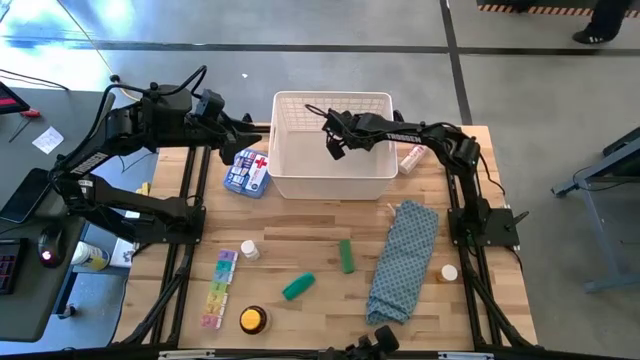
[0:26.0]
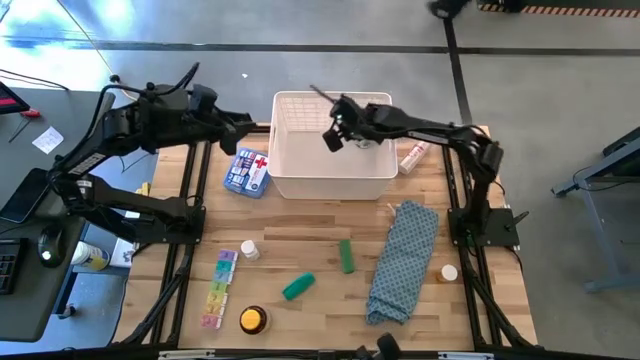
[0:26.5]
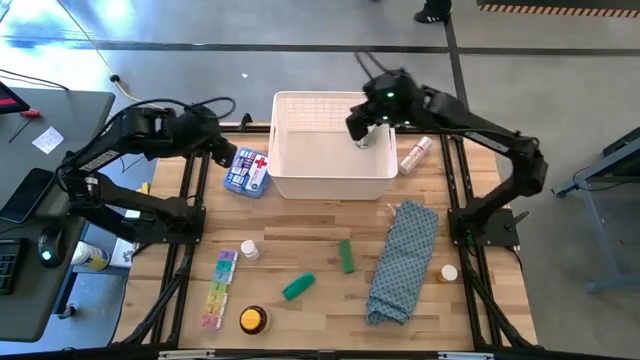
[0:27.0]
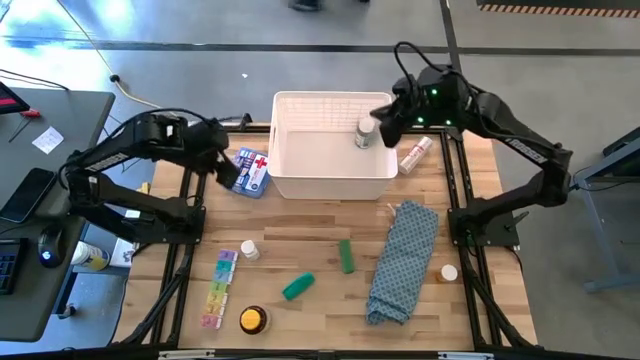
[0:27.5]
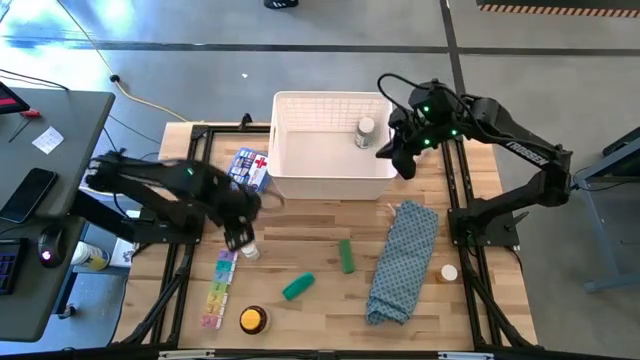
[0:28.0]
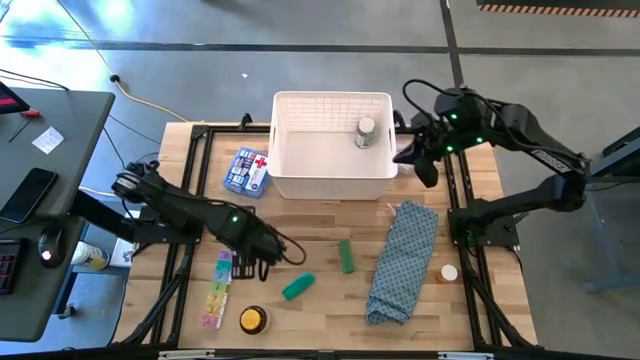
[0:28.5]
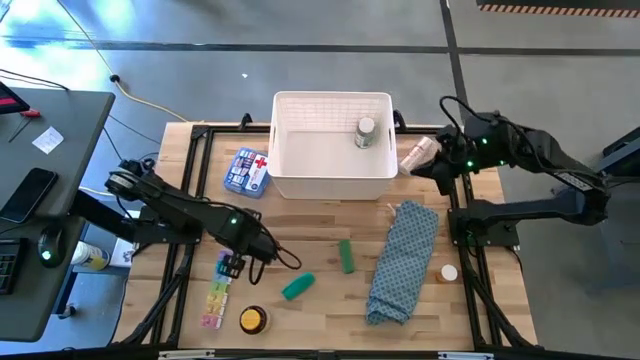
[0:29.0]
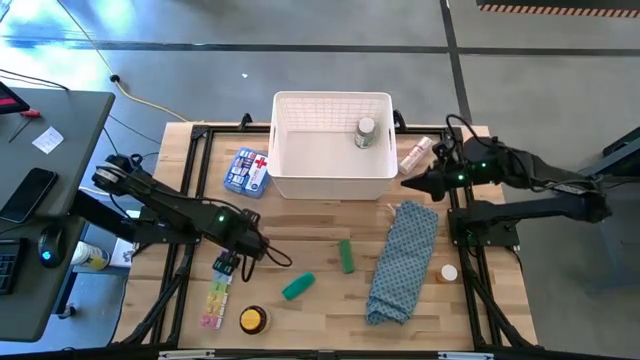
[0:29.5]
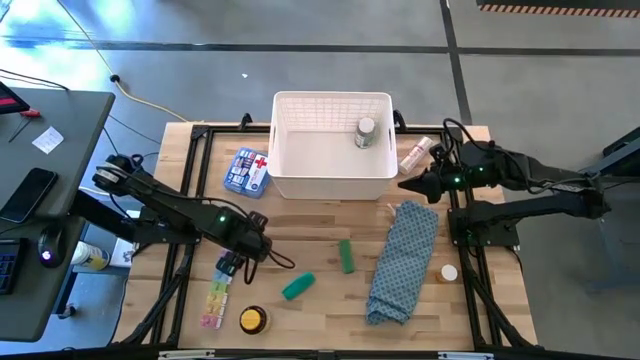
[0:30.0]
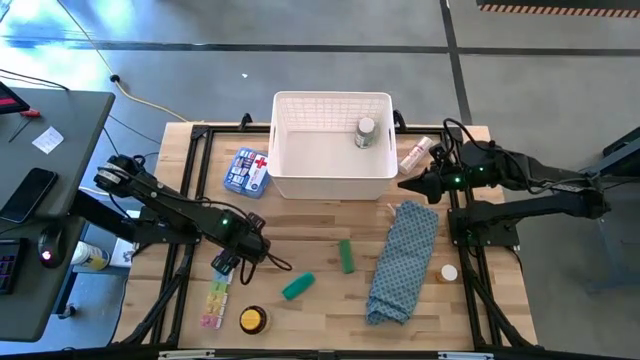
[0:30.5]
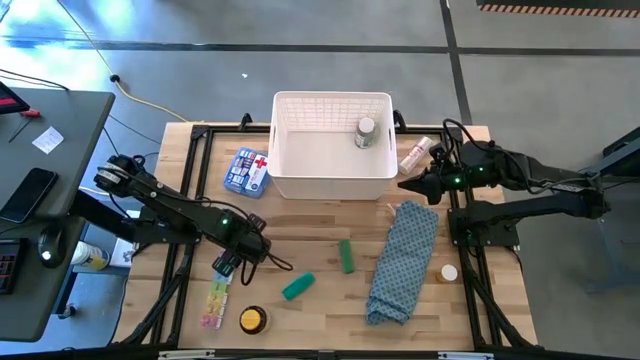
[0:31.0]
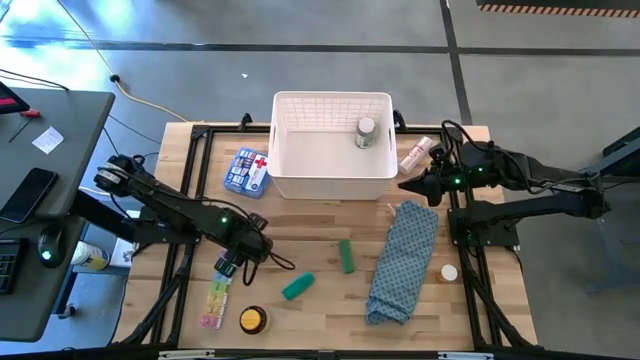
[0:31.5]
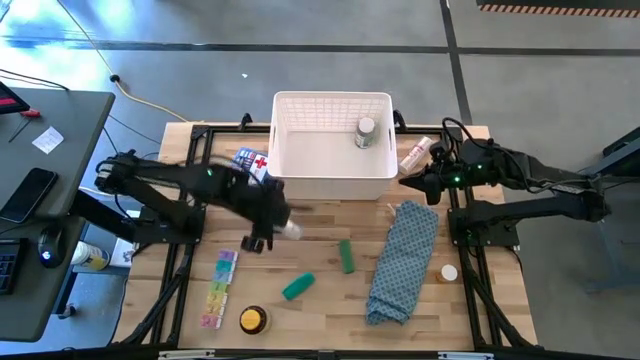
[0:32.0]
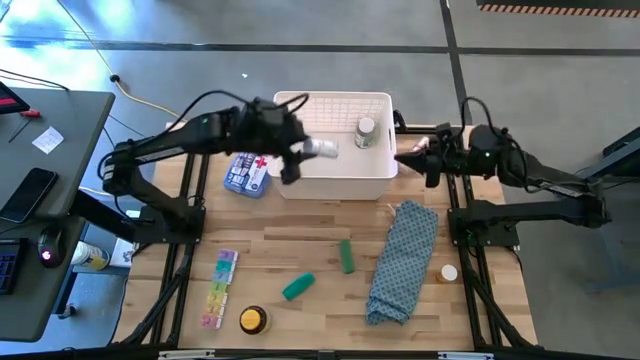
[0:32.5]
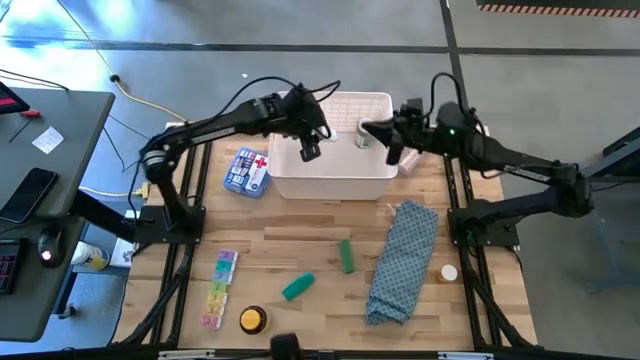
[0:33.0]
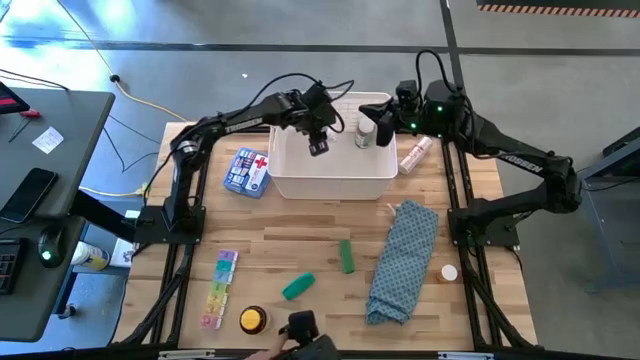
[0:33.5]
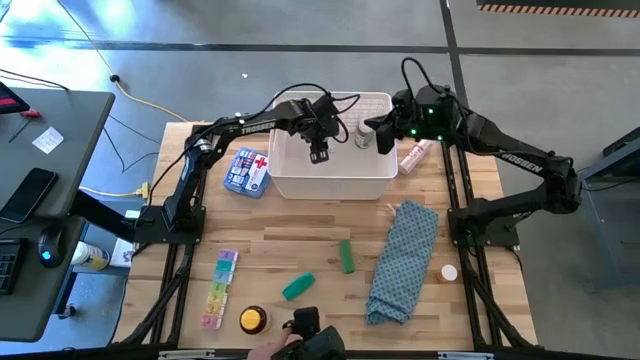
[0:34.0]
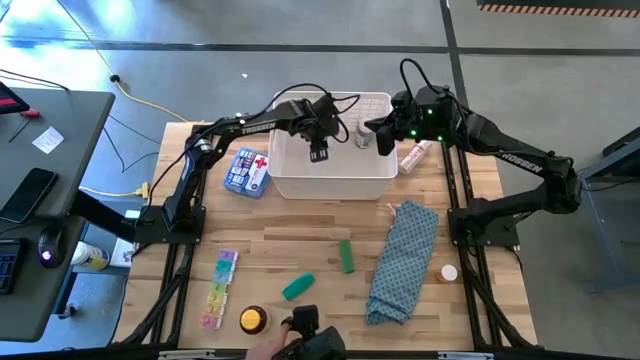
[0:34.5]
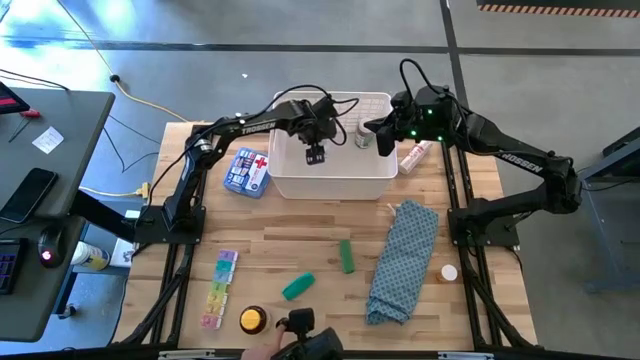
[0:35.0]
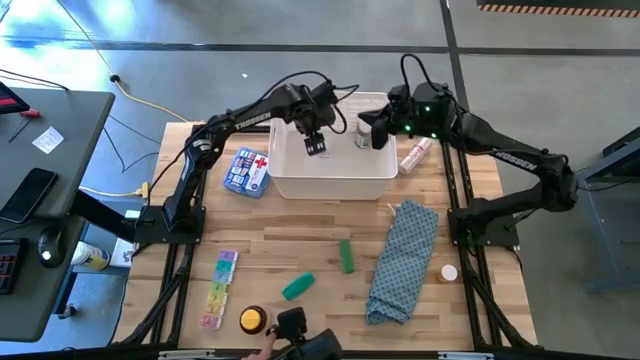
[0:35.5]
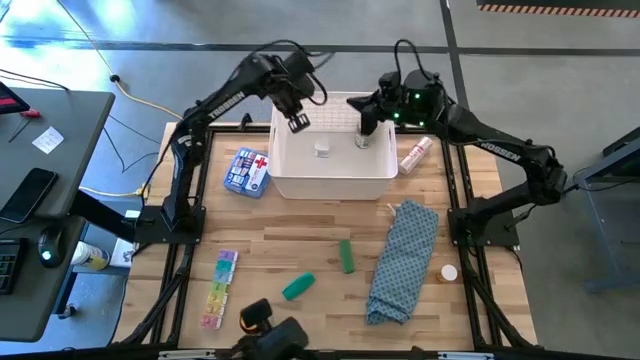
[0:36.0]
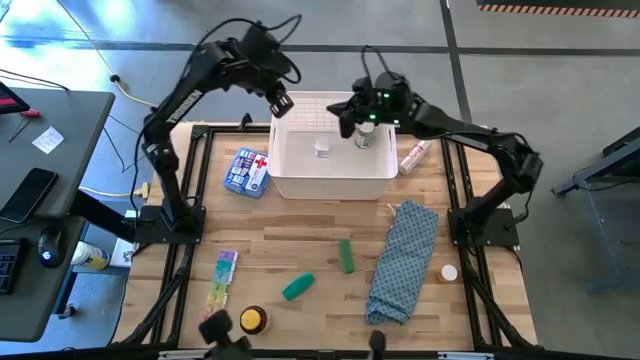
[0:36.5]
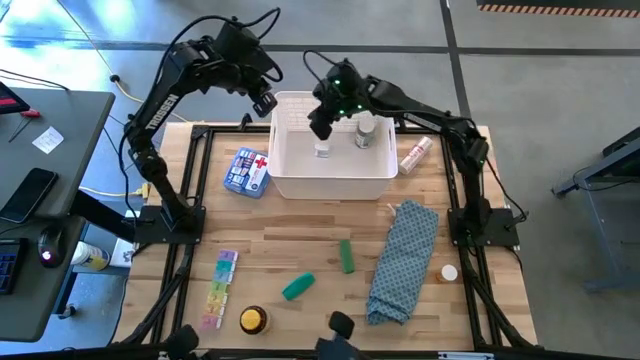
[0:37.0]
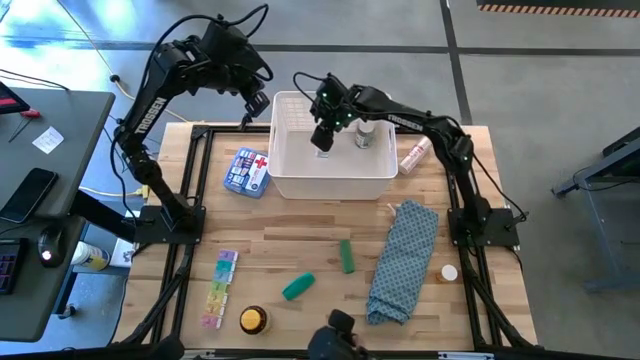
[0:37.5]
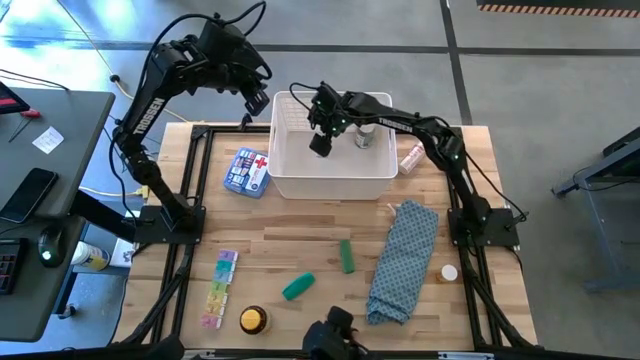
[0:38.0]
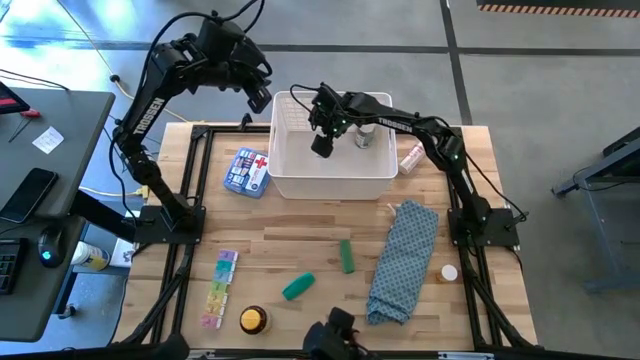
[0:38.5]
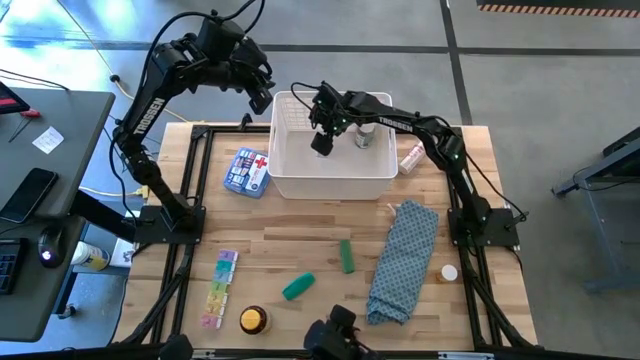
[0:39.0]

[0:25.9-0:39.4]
Task: Pick & place medical supplies in basket/bin
Put the white pill bottle into the white bin

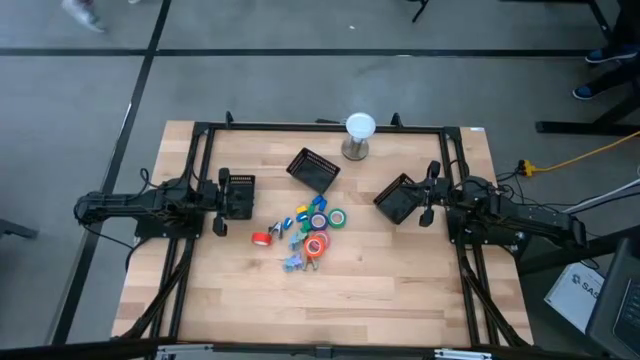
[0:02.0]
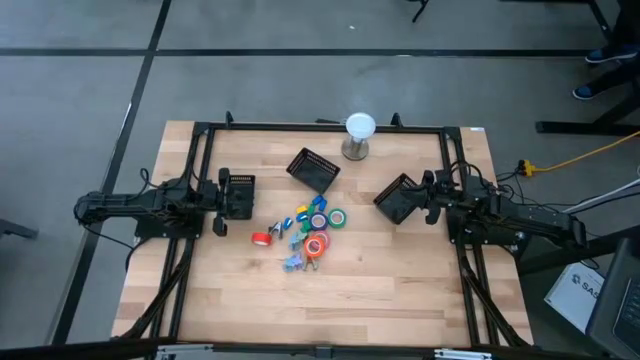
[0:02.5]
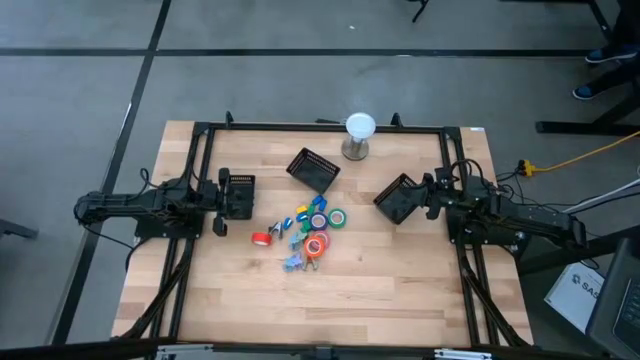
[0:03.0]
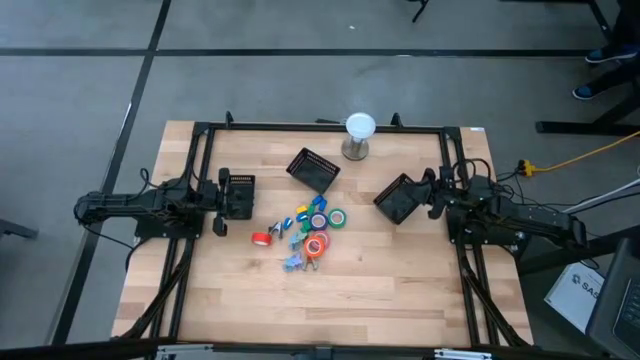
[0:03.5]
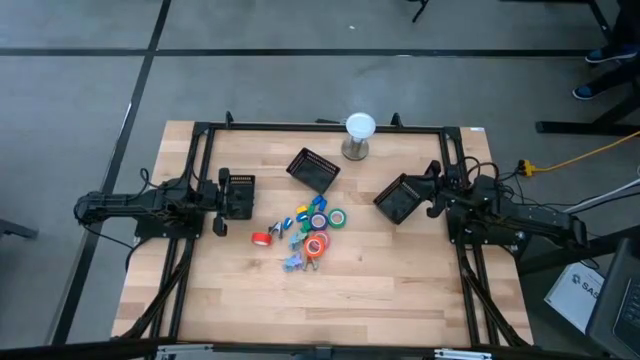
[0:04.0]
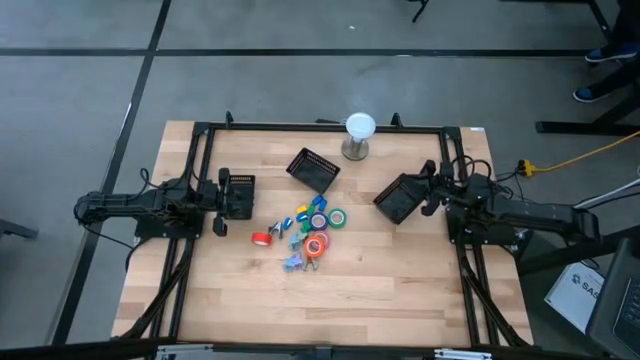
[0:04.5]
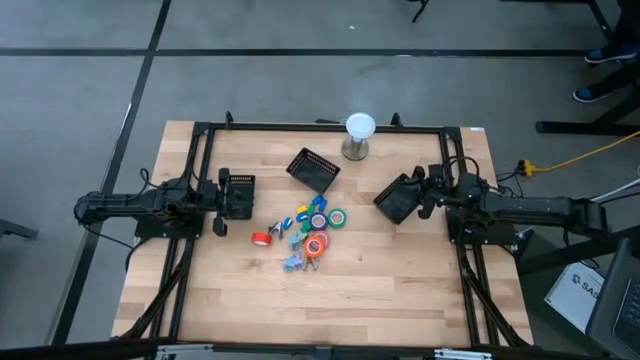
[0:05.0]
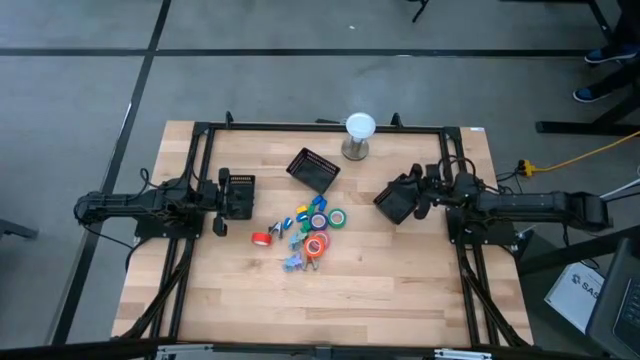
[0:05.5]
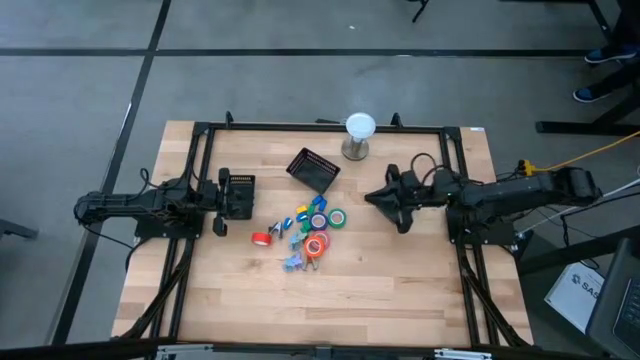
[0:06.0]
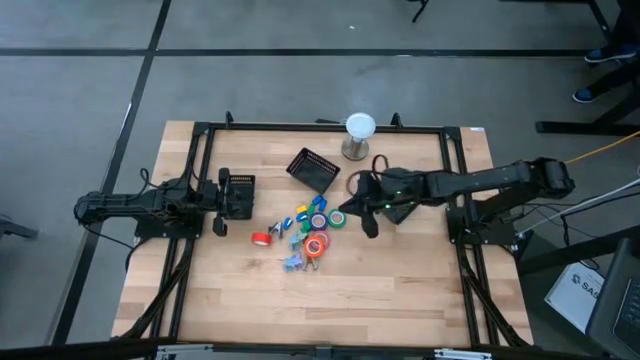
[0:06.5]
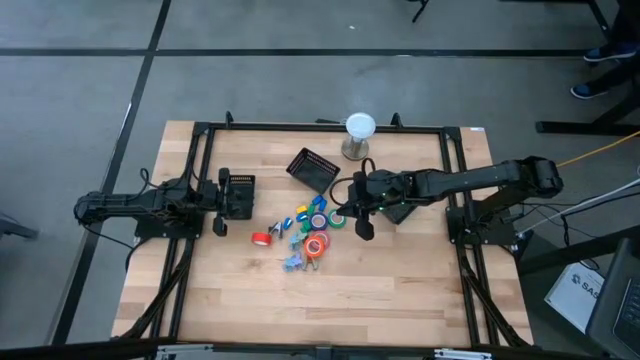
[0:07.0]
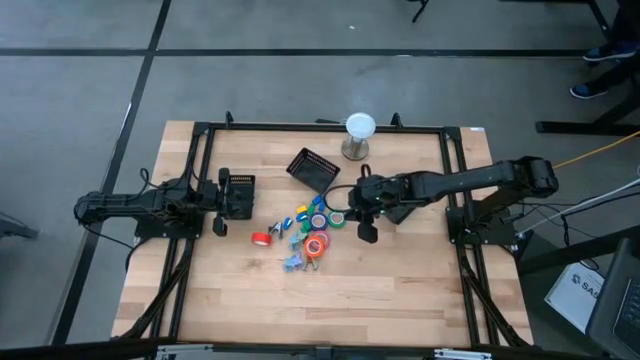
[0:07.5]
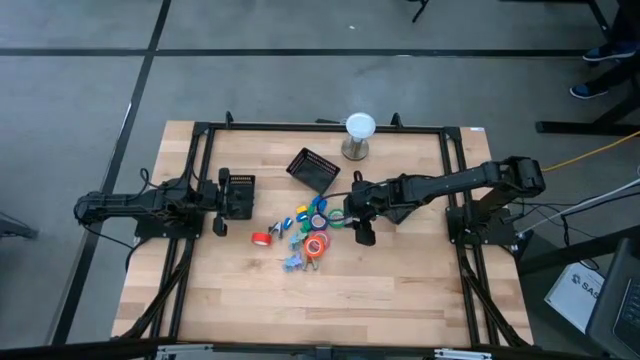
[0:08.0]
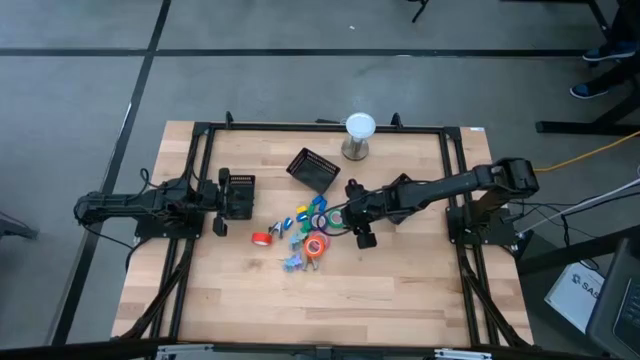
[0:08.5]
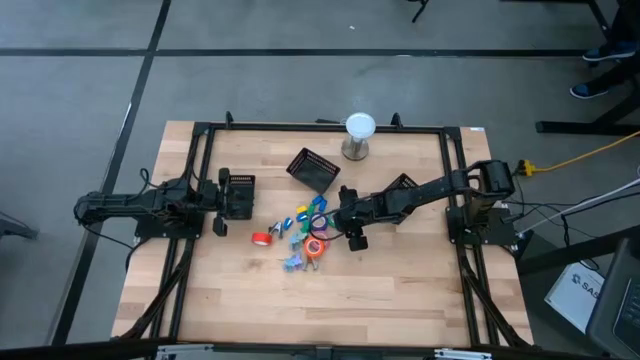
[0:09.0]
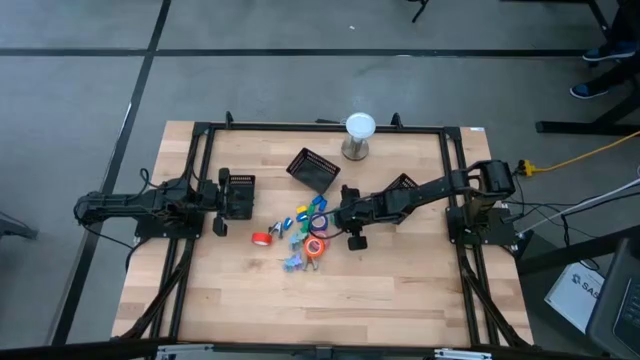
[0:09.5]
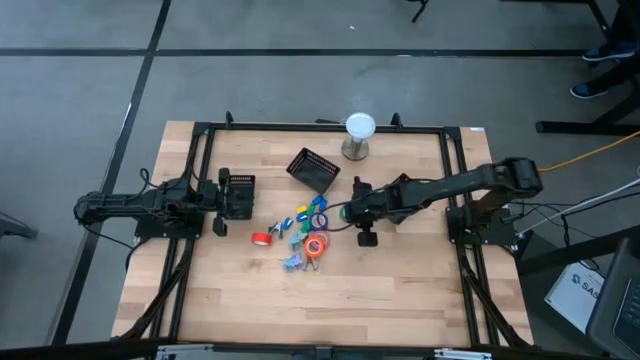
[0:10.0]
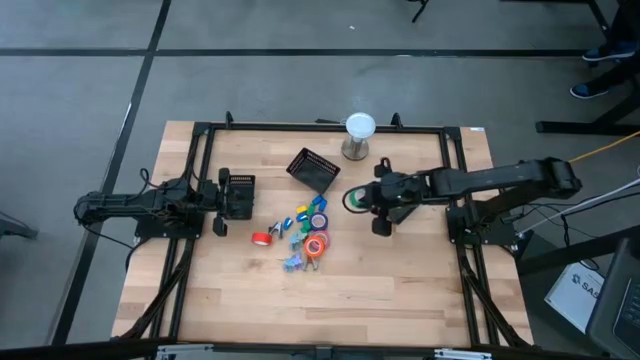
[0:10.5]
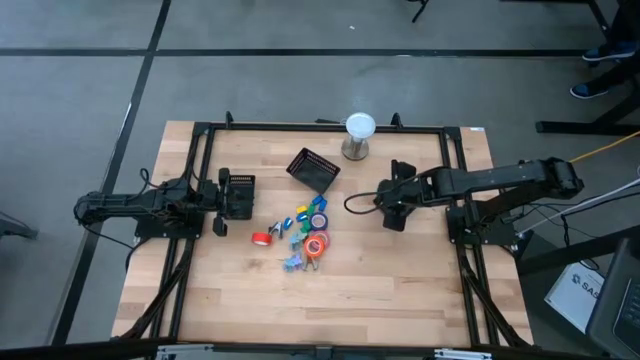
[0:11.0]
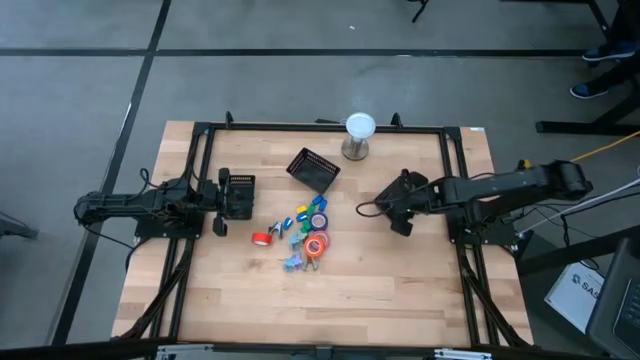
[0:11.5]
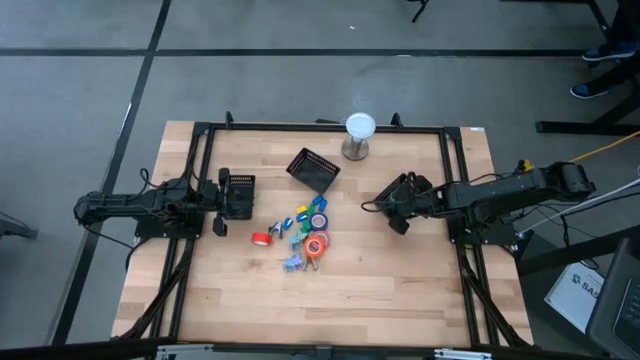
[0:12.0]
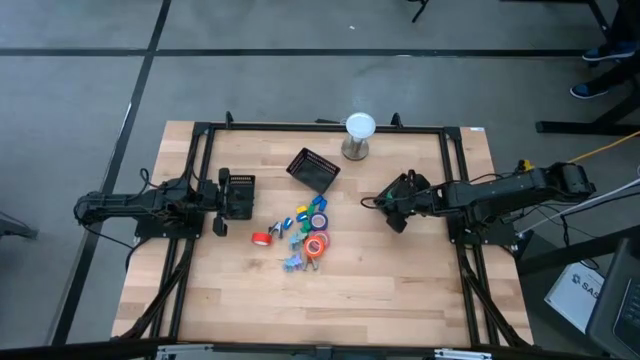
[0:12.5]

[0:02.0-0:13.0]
Task: Pick and place Stapler, Stapler remover, tape
Put the green tape into the right black bin
